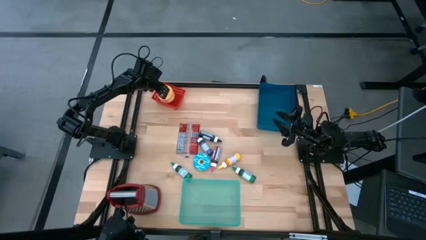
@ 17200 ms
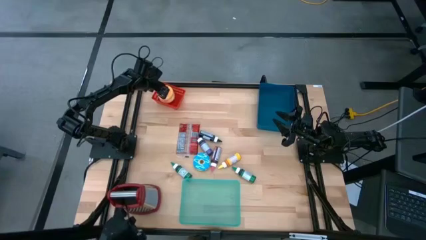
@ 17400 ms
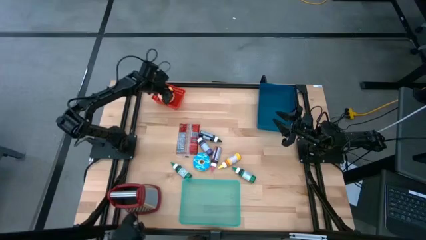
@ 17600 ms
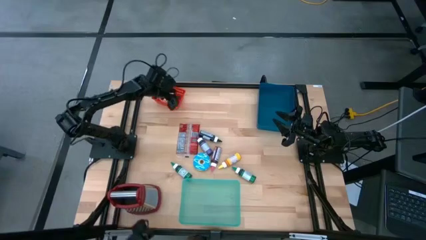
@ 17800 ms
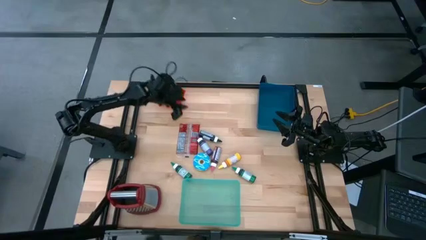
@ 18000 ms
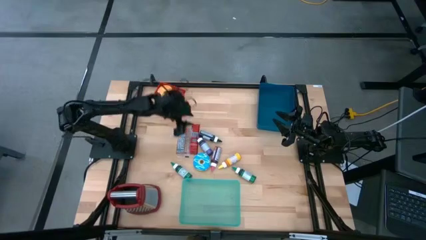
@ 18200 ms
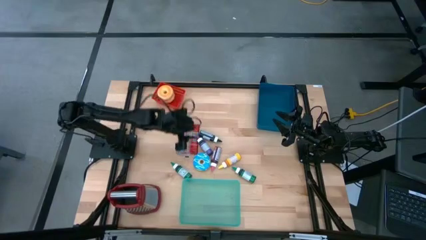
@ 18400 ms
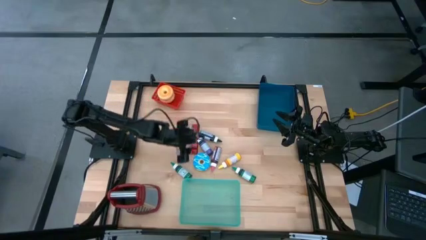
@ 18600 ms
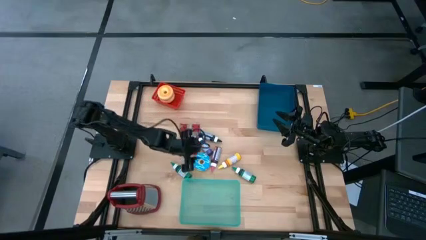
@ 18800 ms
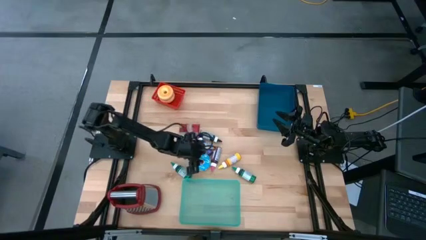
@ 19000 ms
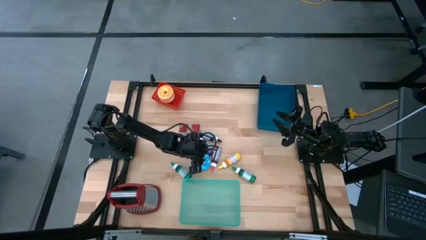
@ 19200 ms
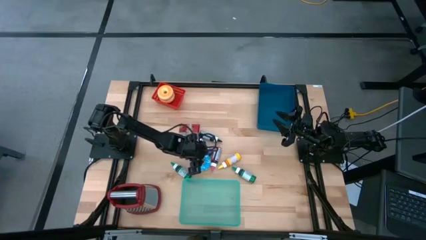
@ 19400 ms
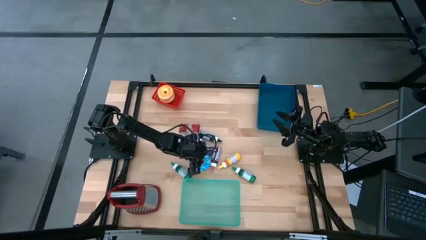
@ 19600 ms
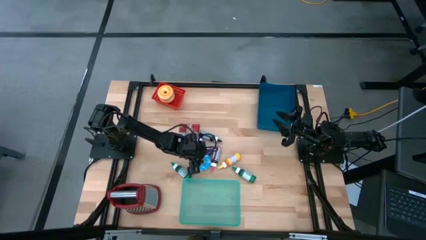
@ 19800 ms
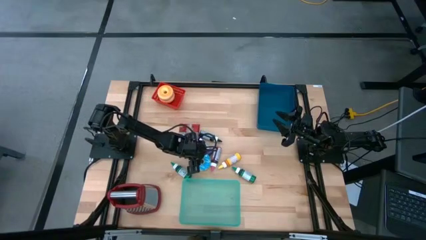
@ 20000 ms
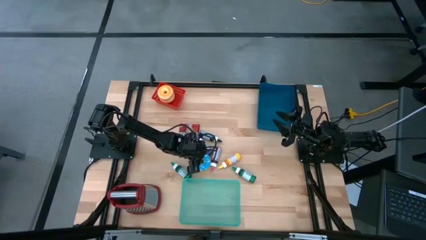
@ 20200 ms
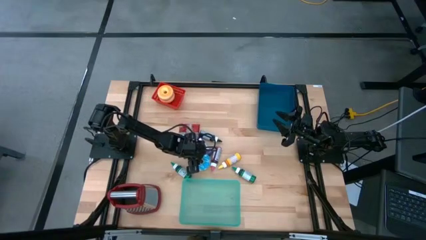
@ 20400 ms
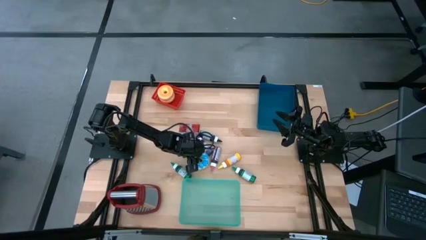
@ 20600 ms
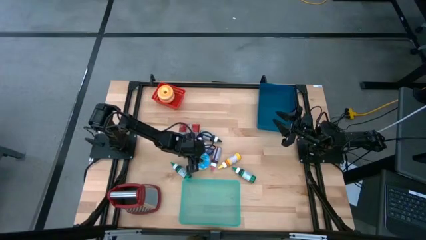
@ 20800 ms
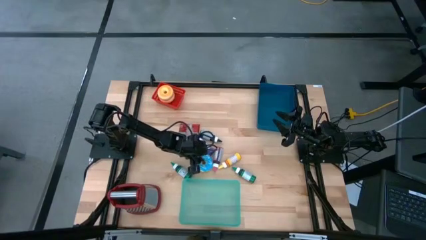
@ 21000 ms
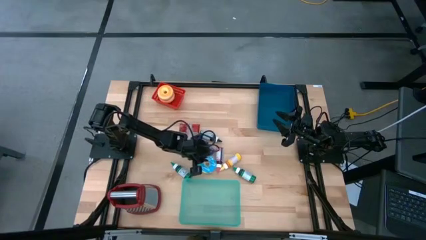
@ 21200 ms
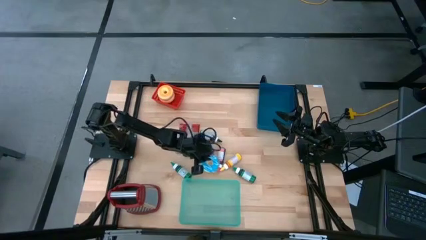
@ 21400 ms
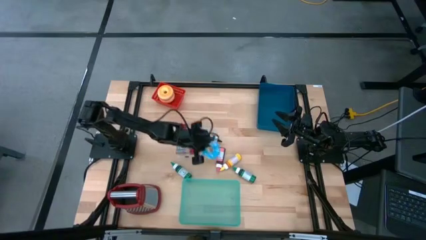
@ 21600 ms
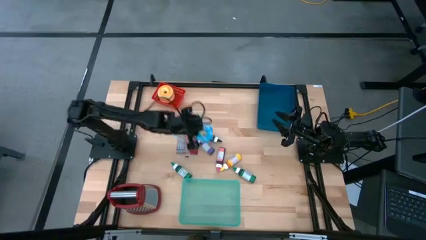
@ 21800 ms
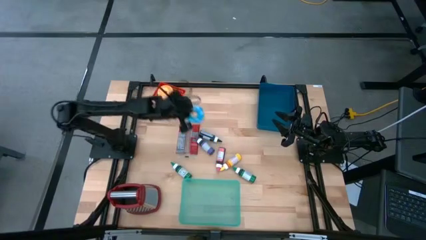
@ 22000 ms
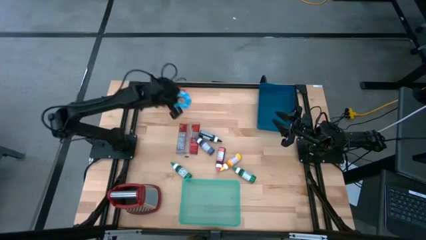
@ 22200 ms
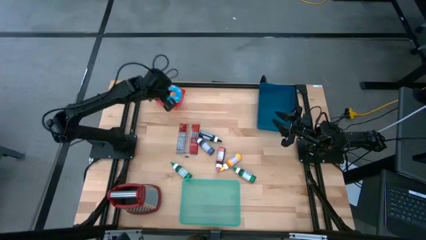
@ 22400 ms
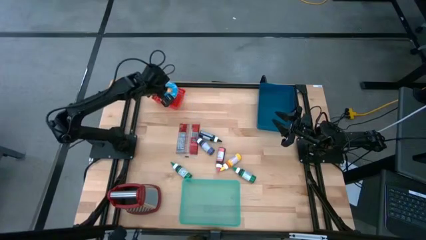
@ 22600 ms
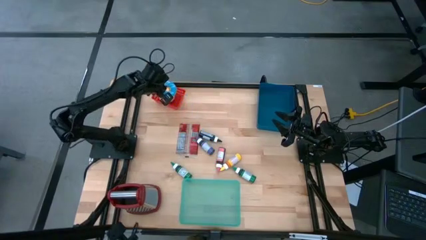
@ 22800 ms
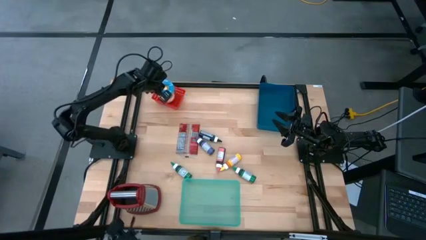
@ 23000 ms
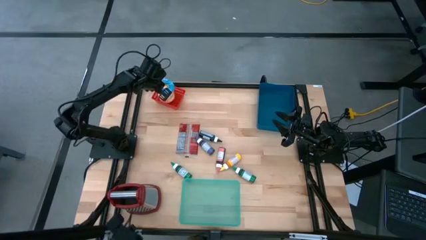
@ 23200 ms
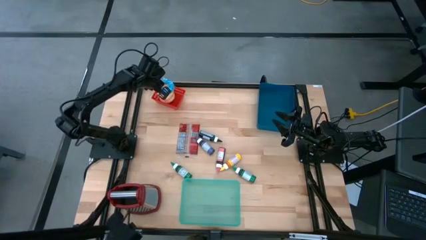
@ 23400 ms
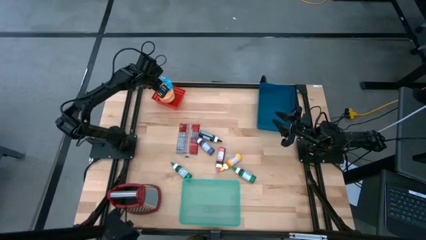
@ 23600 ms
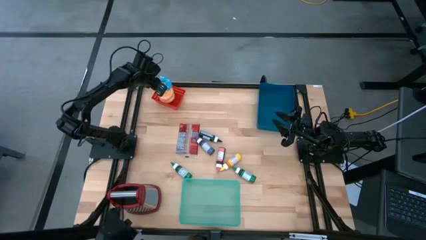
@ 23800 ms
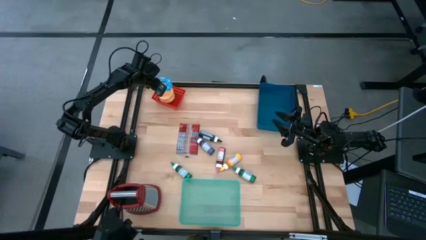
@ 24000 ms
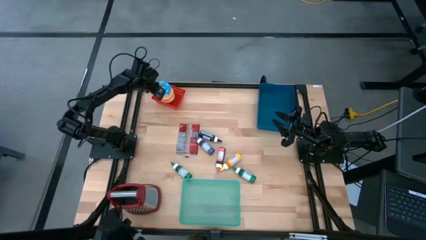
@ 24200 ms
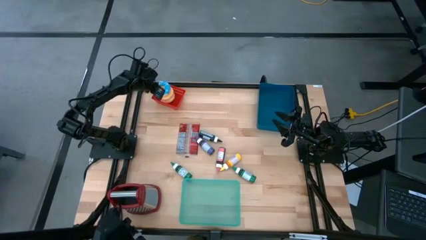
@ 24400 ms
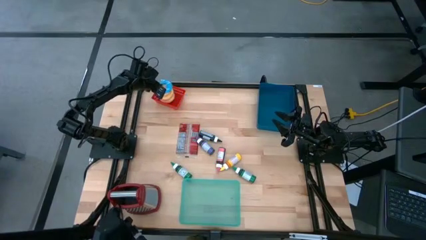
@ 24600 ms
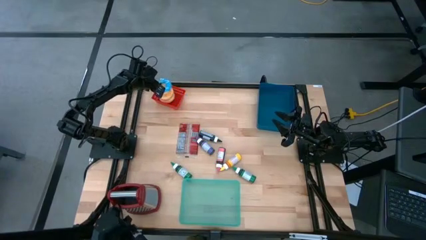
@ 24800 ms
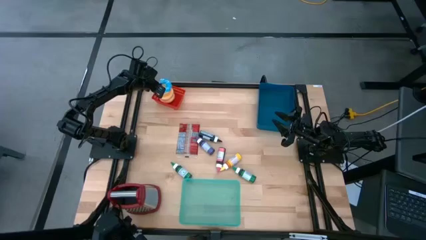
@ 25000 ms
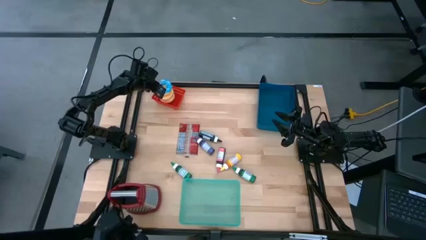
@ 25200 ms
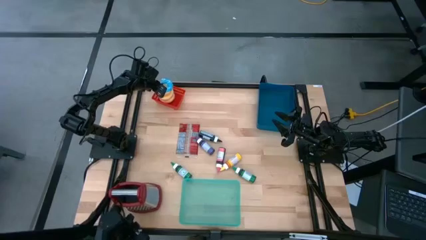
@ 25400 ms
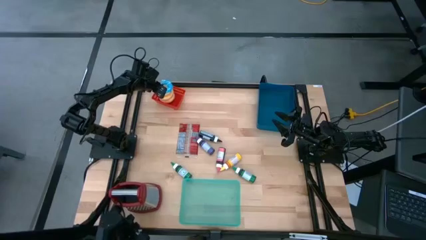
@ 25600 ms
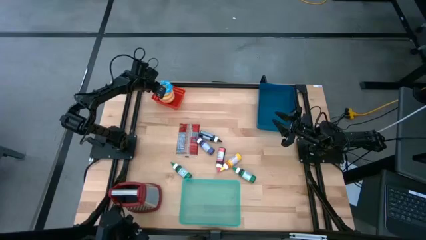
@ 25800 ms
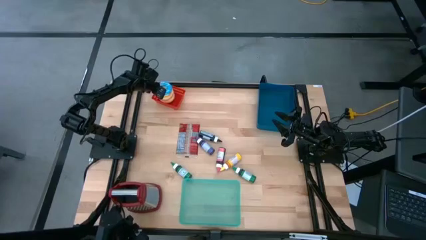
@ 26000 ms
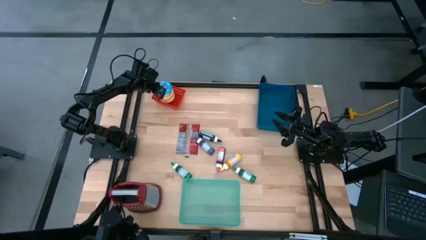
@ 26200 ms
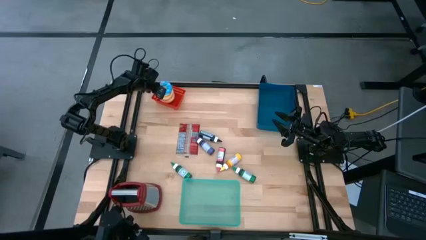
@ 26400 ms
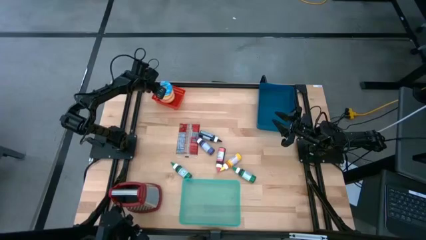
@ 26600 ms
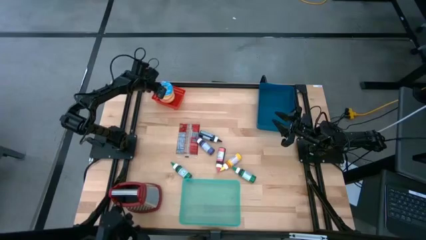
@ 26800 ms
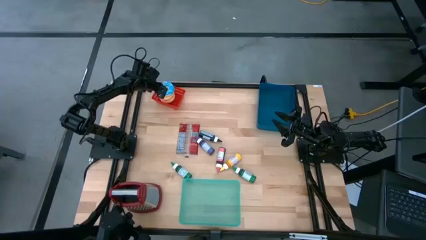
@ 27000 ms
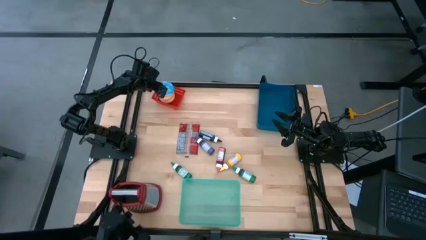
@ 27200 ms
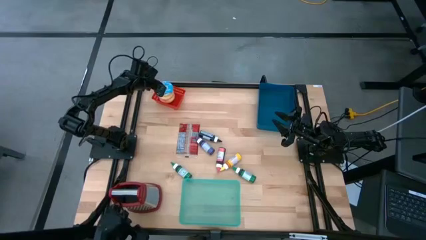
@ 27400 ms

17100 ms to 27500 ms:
Put the blue donut into the red bin

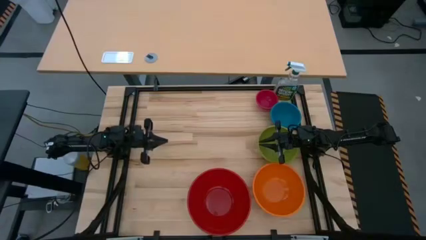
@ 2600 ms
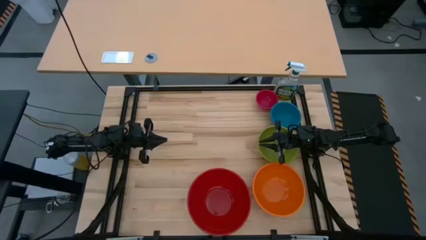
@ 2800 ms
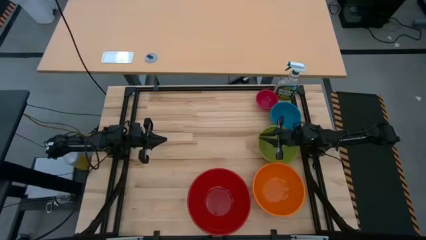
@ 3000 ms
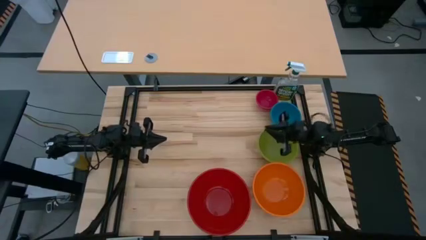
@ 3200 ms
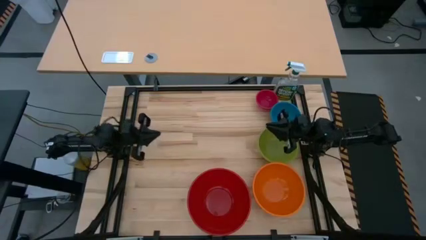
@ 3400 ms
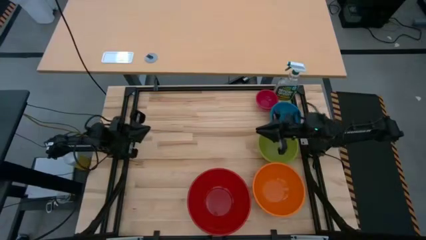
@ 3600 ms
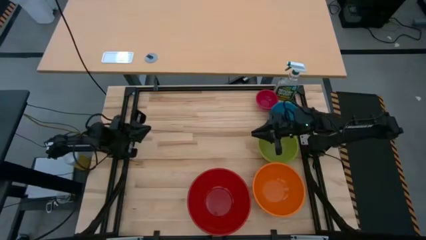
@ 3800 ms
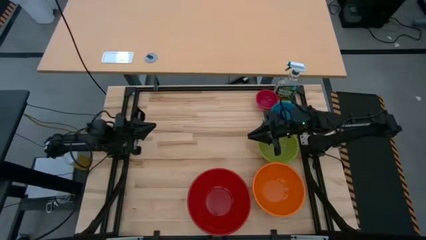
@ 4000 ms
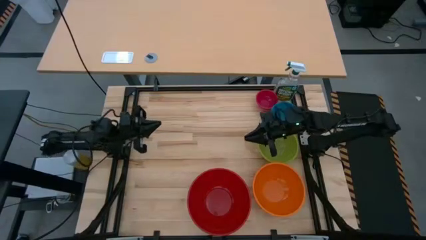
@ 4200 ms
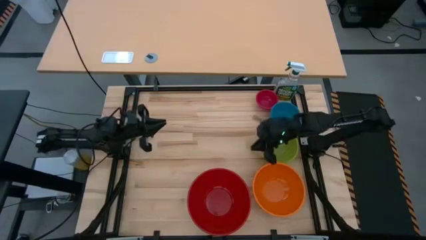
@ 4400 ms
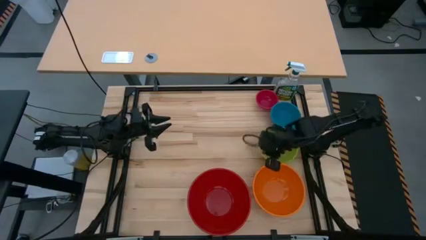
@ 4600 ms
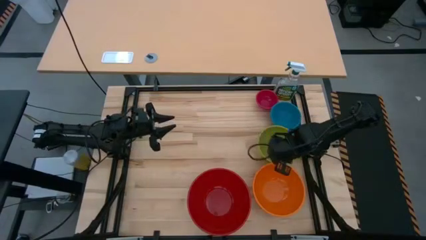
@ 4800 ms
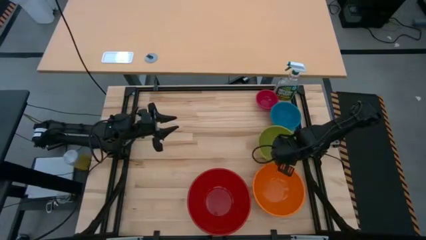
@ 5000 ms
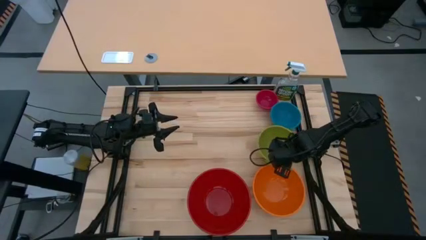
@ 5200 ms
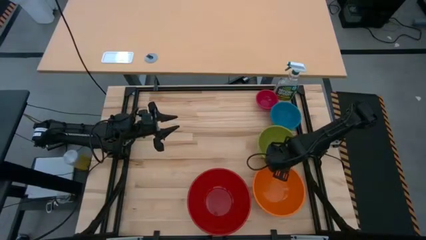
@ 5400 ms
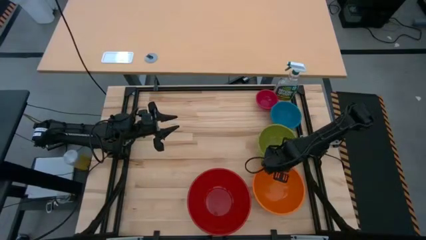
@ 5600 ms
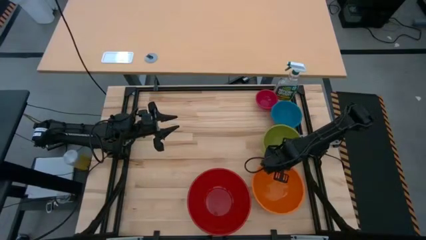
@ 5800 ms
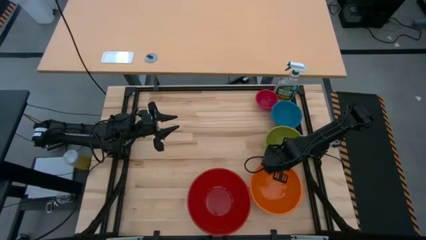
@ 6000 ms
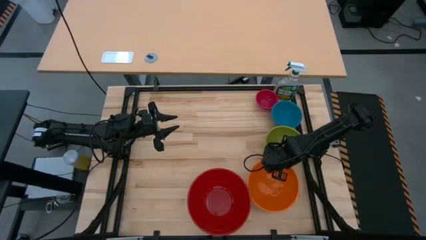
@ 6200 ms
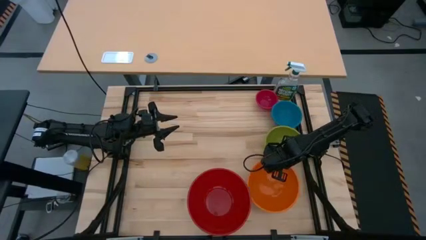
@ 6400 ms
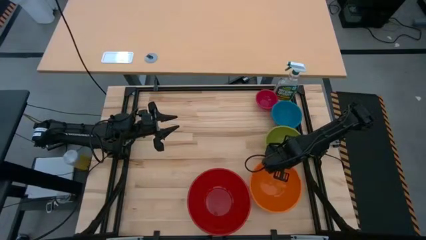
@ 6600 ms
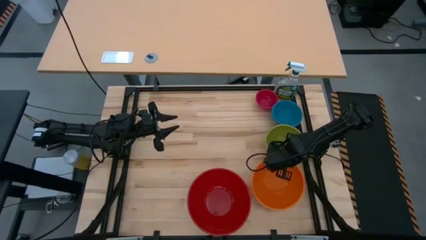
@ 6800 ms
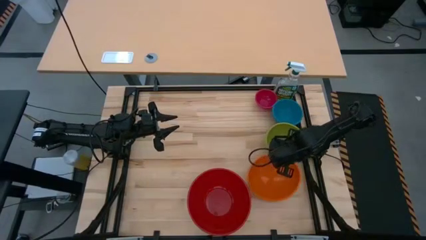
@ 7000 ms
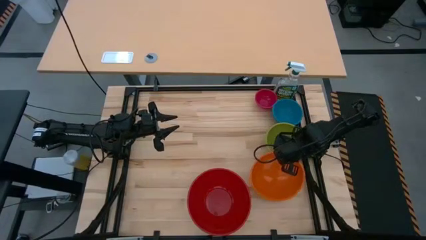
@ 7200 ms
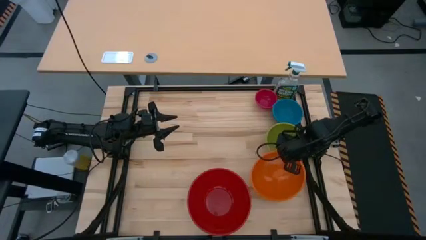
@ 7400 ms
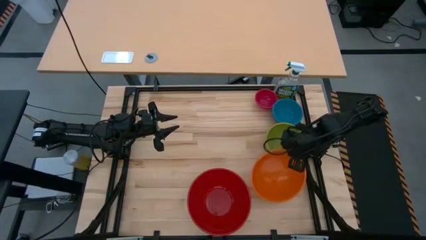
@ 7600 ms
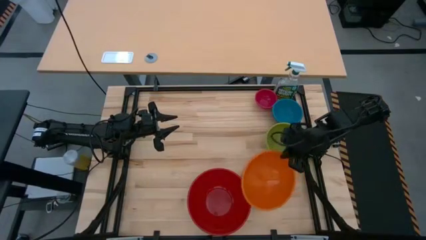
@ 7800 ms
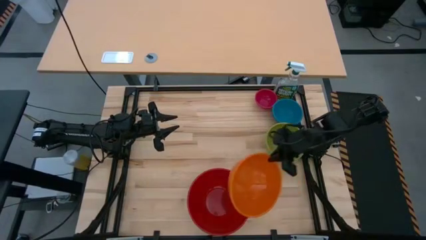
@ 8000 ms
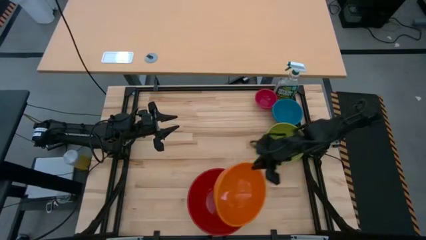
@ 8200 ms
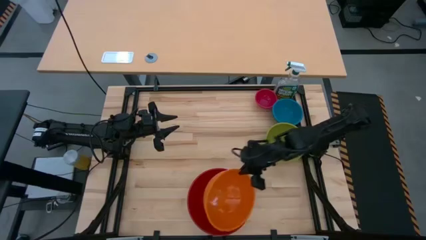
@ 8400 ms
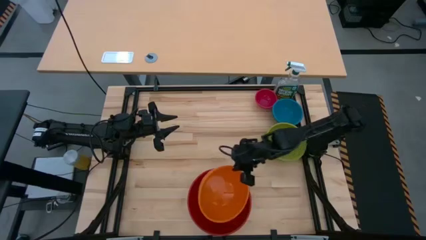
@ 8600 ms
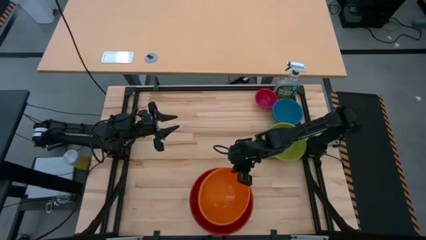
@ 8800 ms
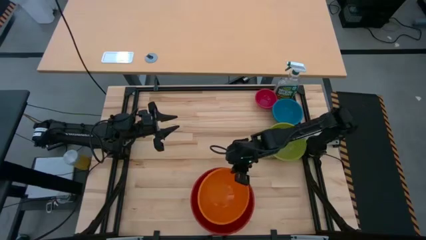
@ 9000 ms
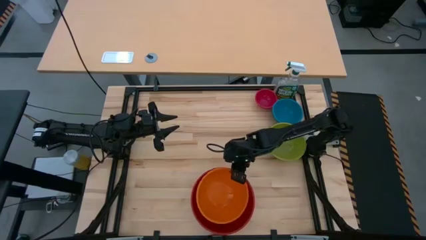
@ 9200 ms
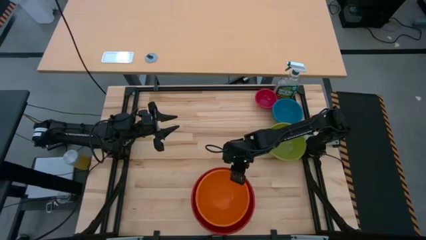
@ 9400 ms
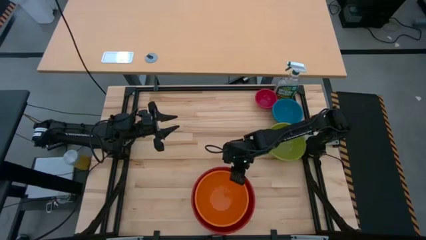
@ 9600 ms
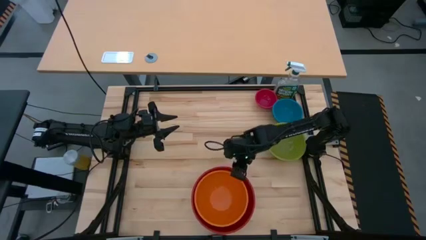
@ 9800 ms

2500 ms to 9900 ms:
Stack the orange bowl on top of the red bowl
